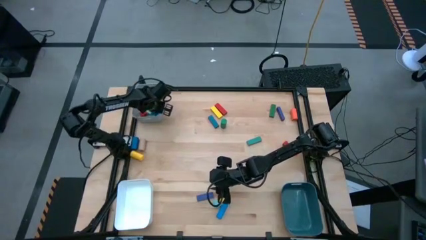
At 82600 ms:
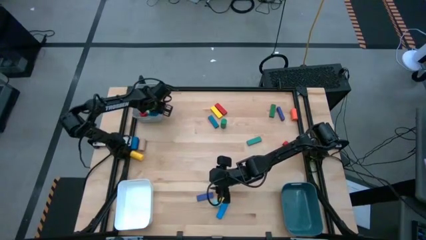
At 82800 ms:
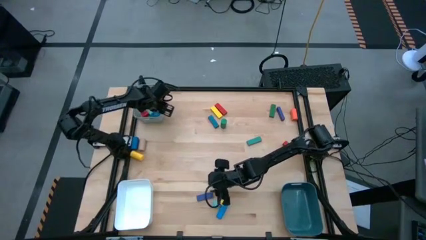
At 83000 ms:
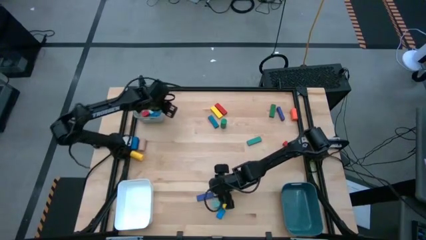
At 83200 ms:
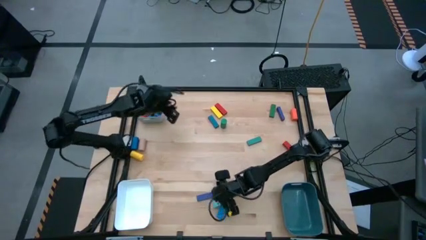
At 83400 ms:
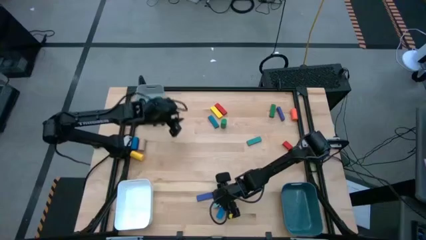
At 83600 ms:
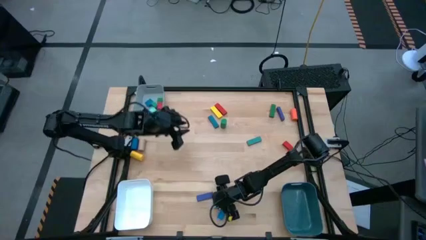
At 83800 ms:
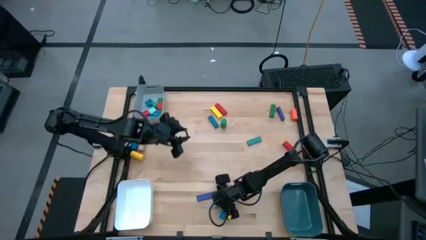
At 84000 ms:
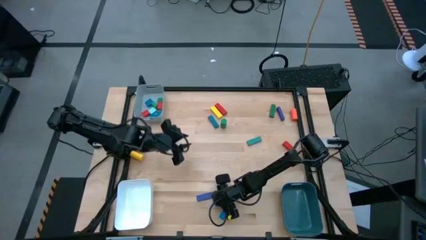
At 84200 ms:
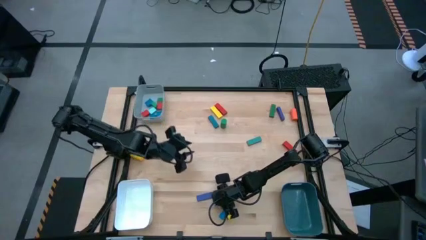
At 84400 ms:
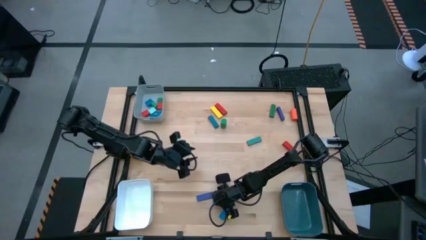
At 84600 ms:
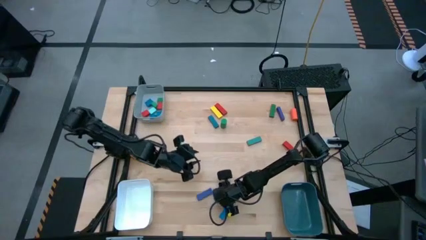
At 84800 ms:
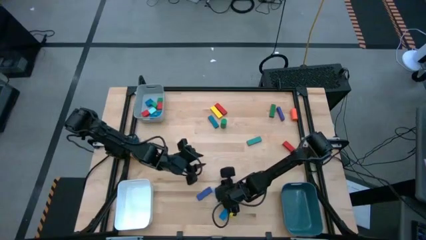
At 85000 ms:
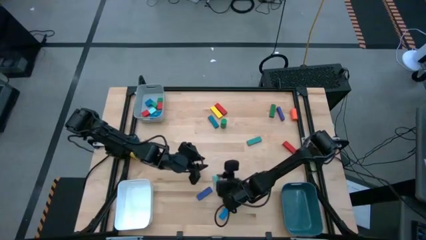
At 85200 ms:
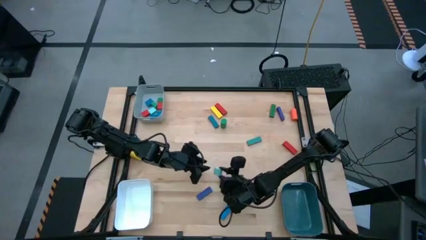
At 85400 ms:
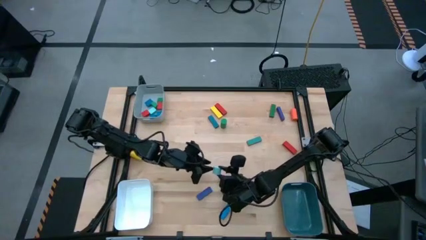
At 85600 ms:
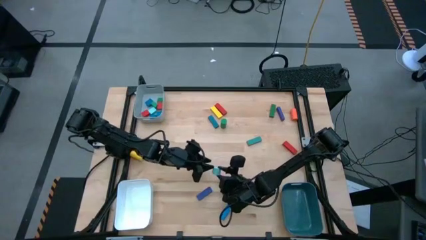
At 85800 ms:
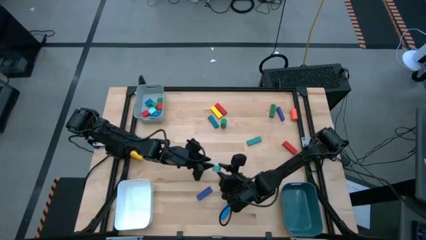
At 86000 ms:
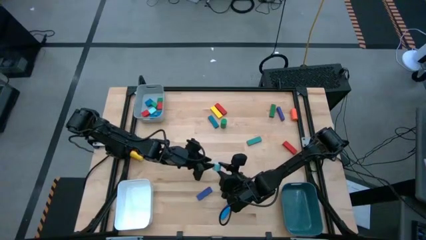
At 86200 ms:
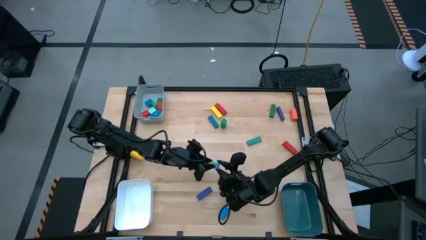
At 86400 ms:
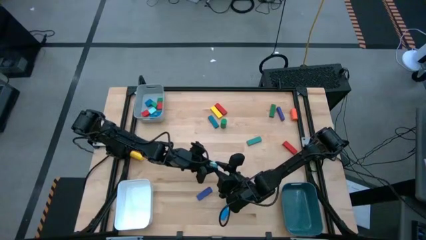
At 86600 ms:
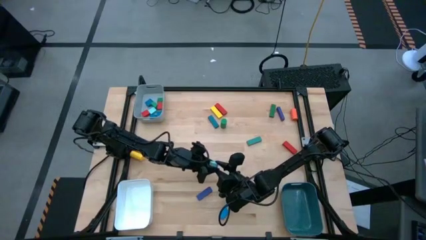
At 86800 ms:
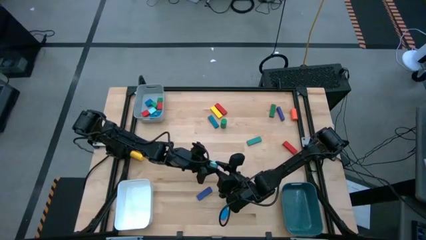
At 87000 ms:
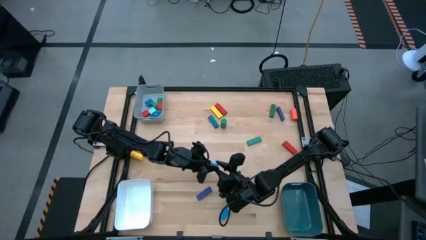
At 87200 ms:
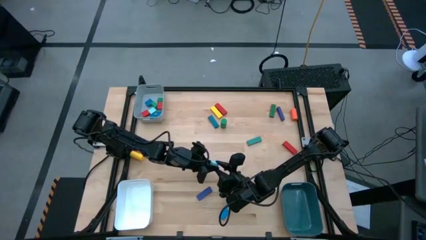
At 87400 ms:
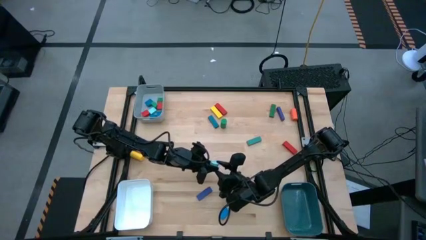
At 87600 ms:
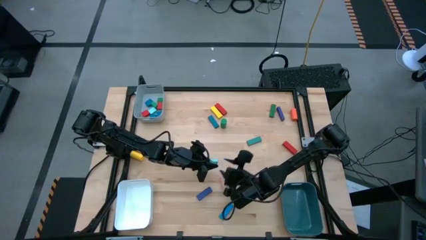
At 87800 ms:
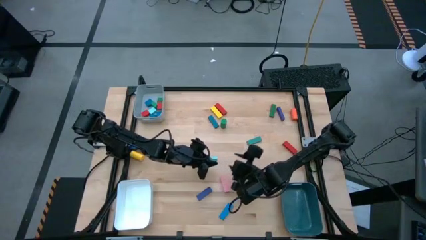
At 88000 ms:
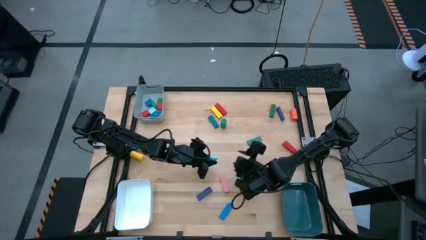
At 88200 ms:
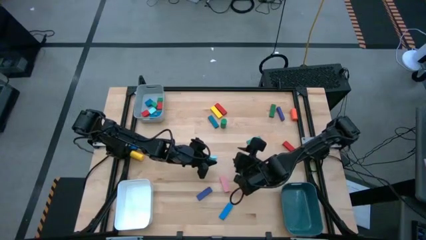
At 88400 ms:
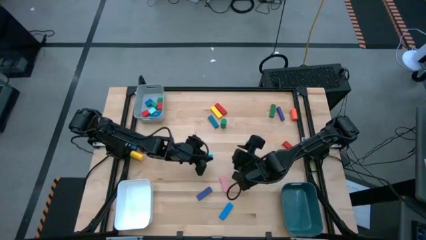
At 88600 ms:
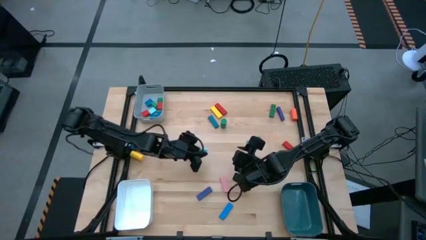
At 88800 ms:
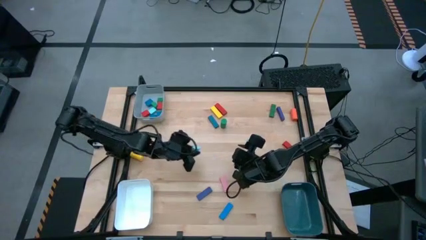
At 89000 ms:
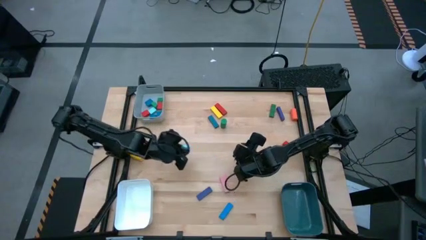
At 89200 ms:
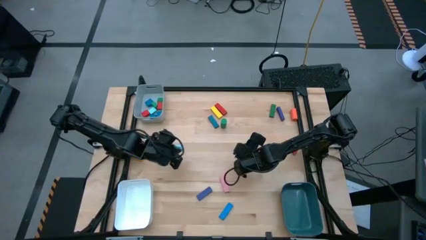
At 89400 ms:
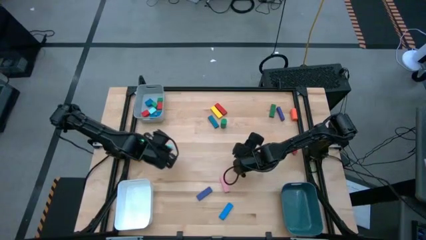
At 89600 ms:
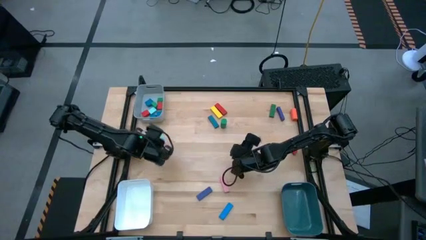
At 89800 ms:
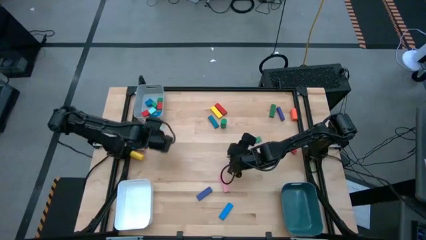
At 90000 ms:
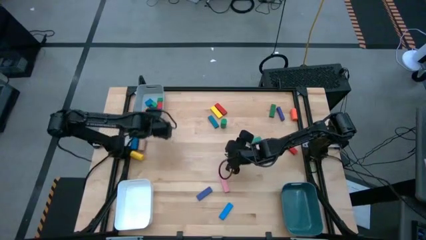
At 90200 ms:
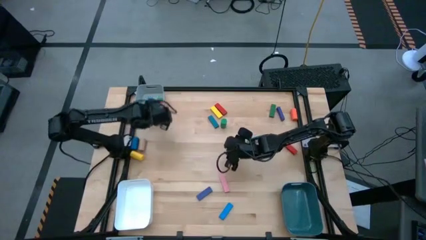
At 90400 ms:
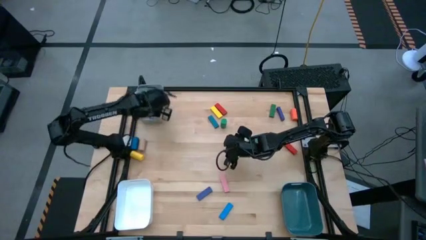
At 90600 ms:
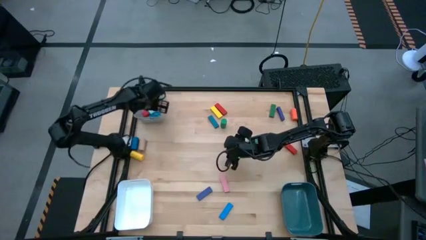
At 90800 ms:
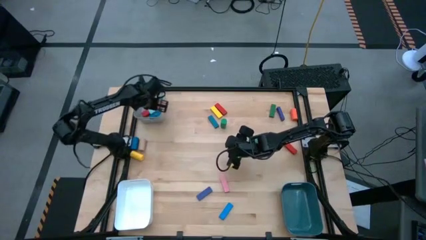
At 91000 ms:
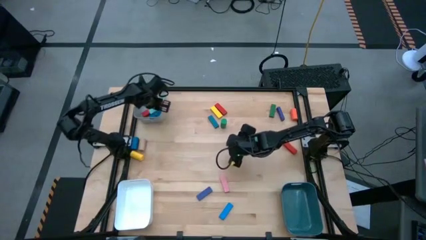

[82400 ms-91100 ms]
Task: Sort blocks by size
Put the light blue half-circle block into the gray bin

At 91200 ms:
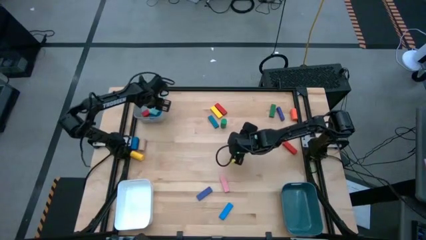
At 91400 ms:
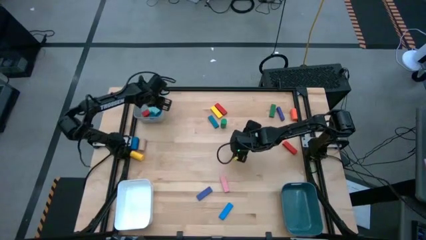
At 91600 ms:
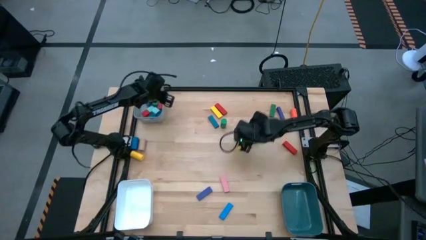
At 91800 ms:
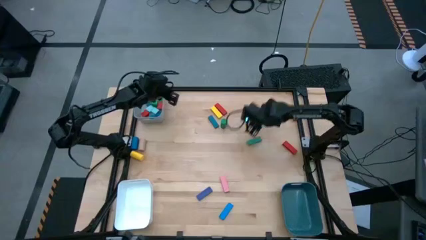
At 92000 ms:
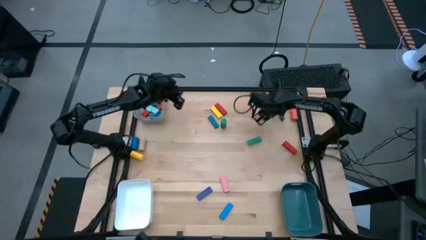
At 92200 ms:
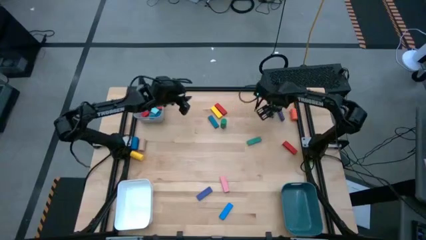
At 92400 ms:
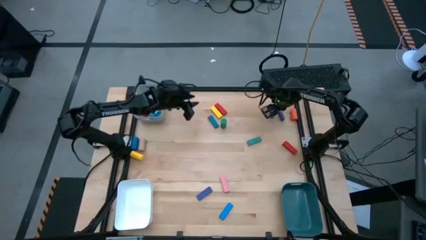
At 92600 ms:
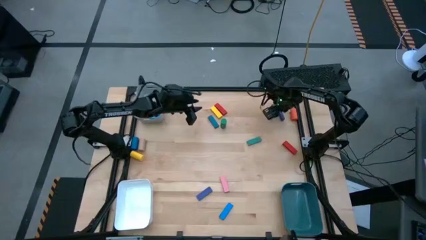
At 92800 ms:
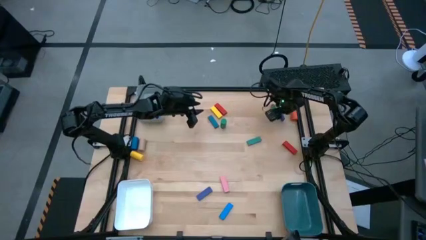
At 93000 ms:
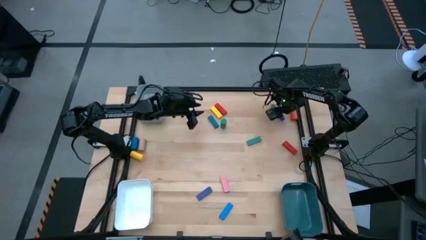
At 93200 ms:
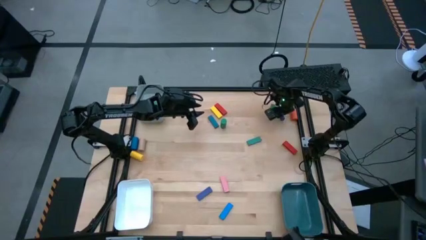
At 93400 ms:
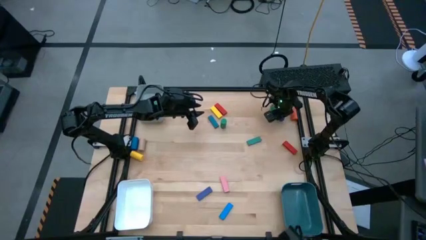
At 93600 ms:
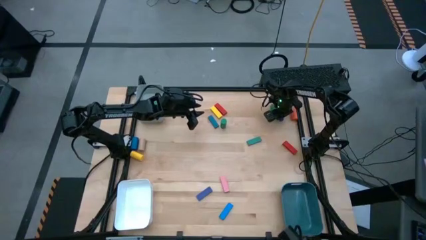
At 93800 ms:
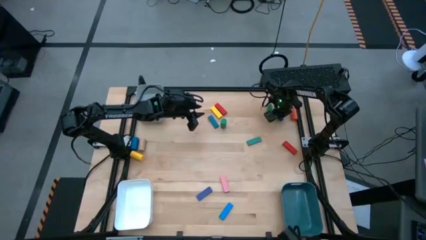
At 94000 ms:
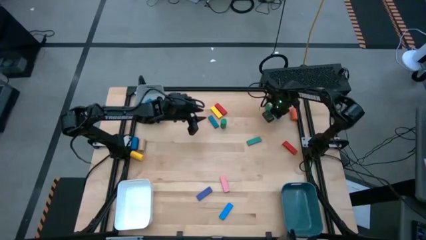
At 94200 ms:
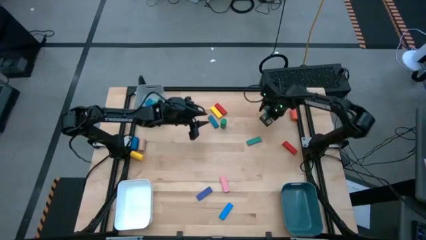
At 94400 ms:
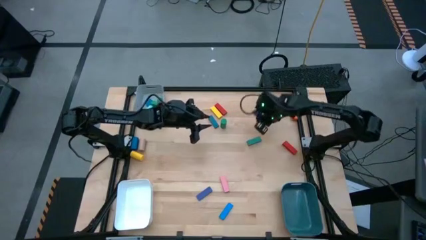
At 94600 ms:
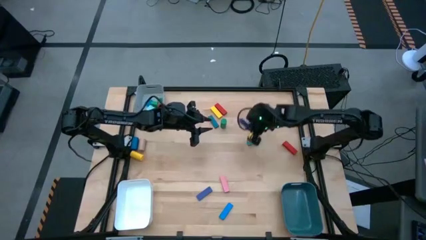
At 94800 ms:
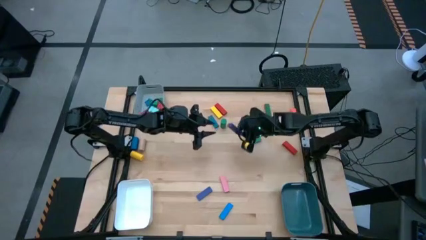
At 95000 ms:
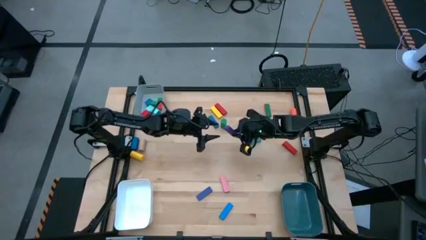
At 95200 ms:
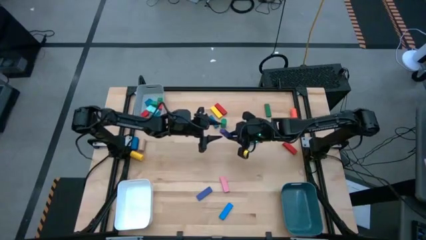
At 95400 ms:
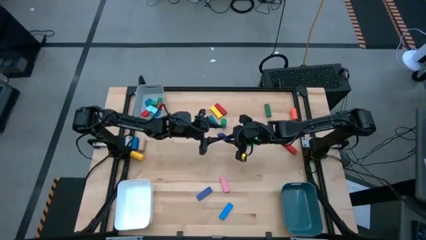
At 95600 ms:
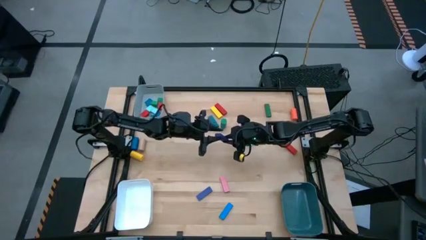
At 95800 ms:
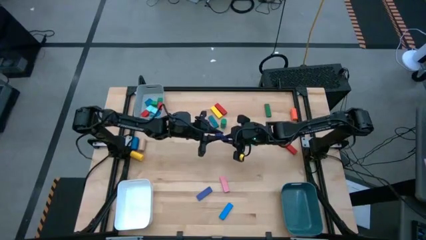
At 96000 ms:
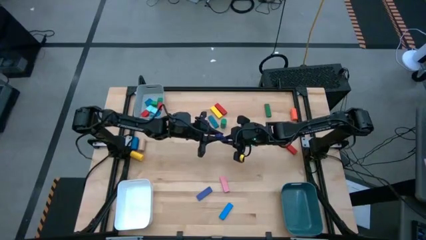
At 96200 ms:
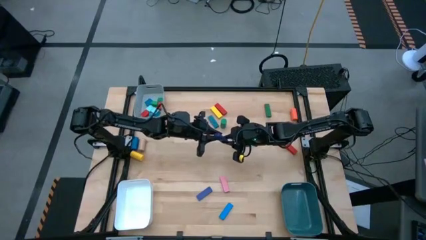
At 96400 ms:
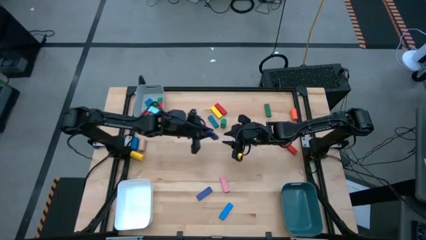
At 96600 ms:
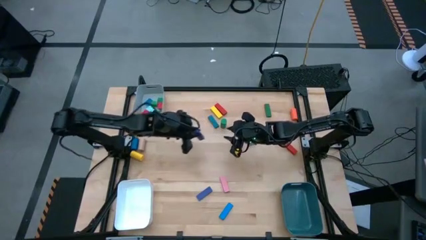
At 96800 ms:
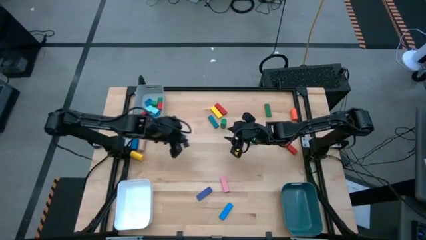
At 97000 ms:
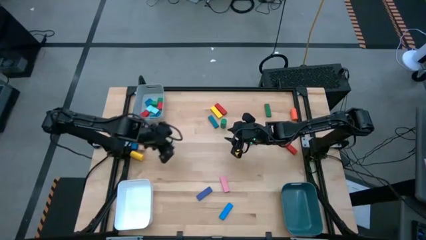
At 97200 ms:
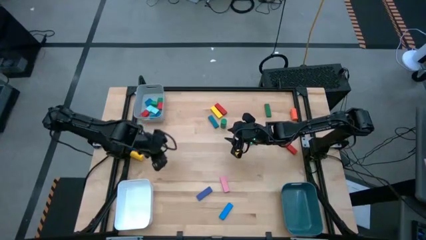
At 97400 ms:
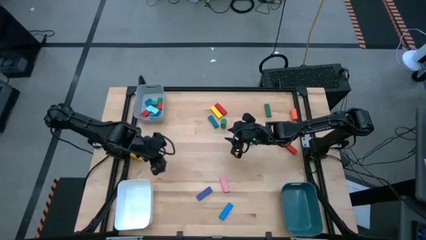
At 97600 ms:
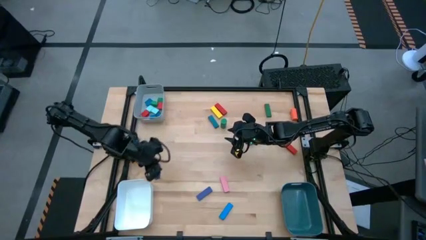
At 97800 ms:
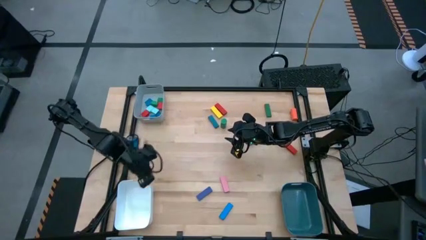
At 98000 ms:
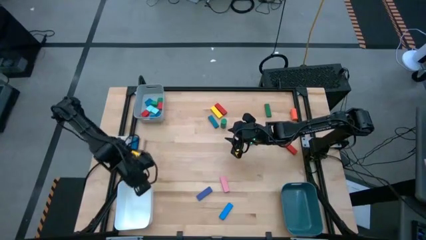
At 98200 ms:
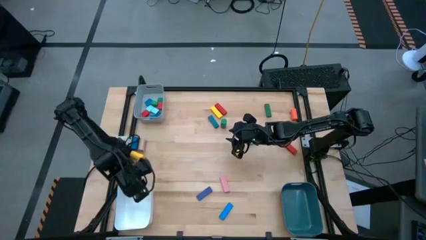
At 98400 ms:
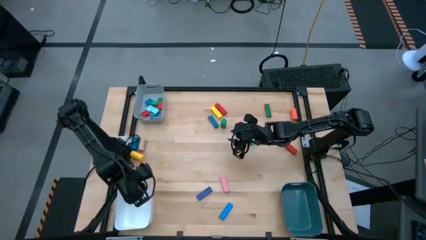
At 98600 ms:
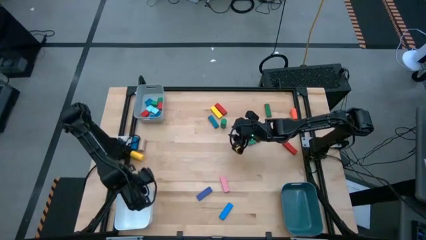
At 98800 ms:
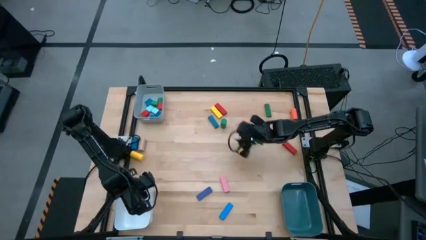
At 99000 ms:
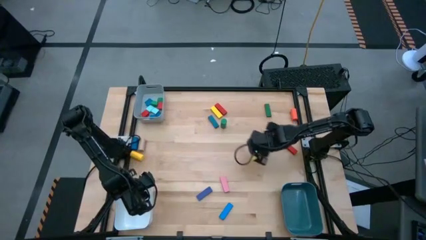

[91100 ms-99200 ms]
Put the blue rectangular block into the white bin
